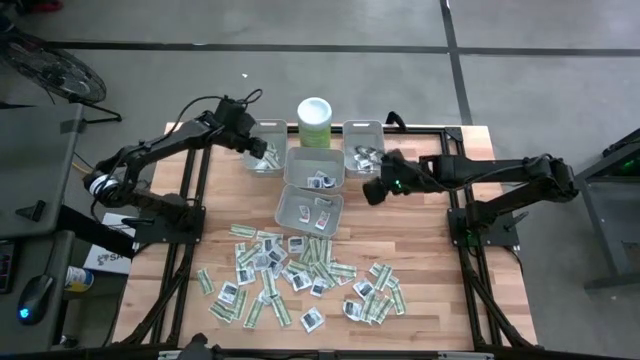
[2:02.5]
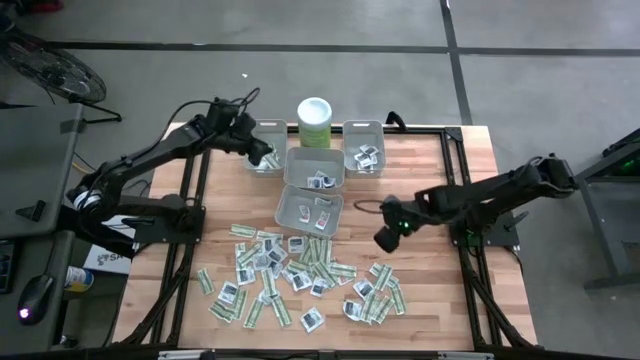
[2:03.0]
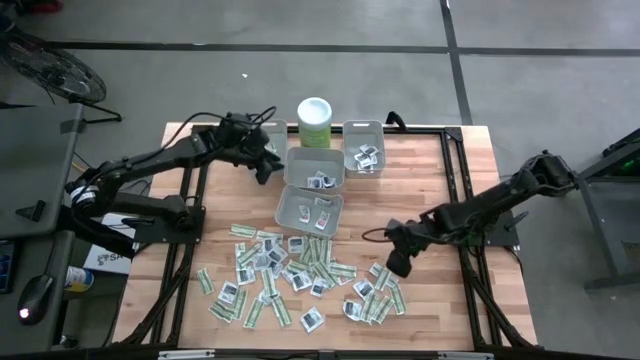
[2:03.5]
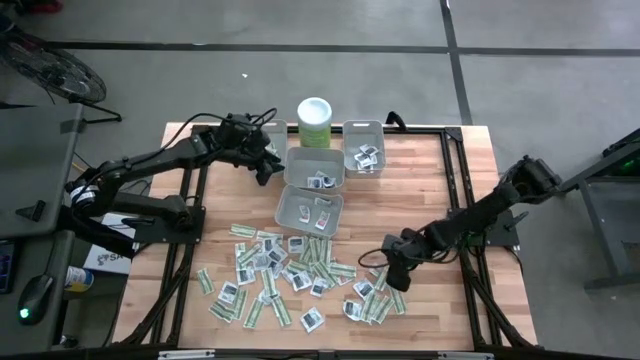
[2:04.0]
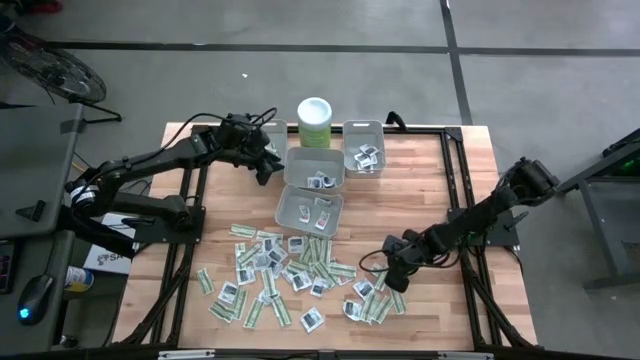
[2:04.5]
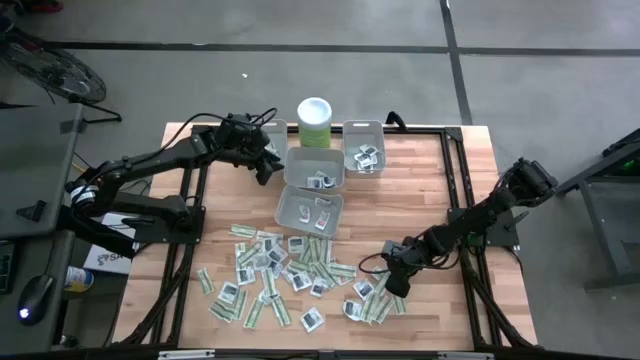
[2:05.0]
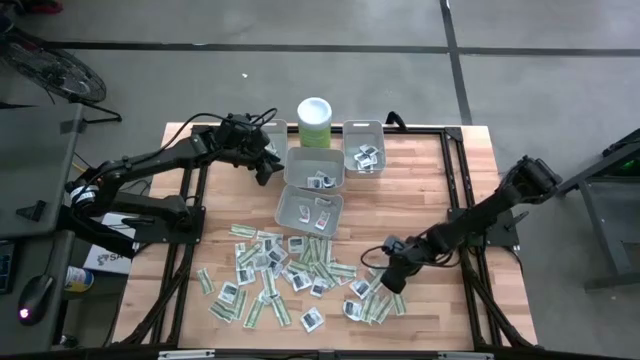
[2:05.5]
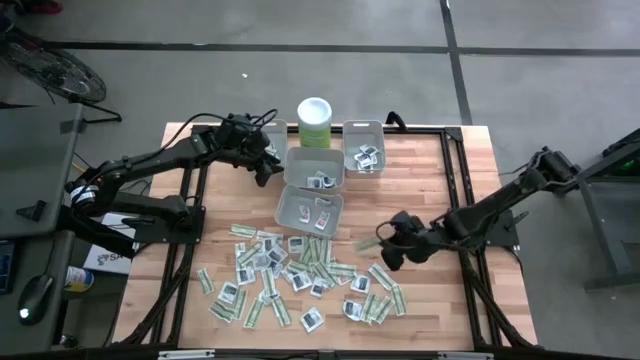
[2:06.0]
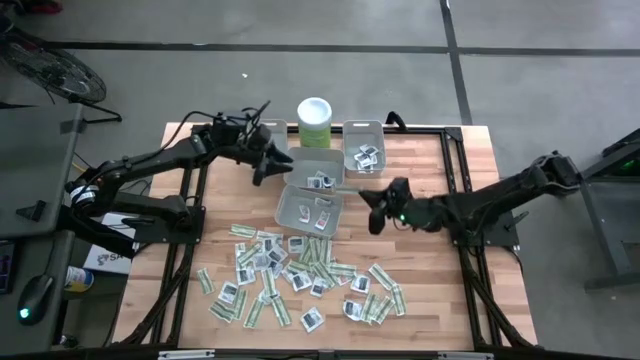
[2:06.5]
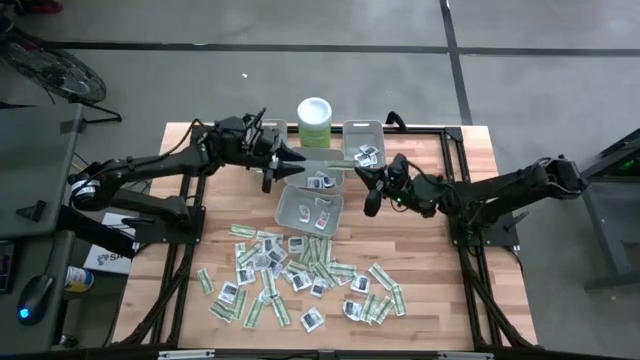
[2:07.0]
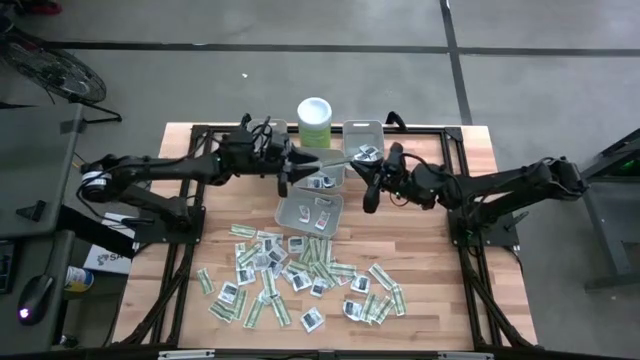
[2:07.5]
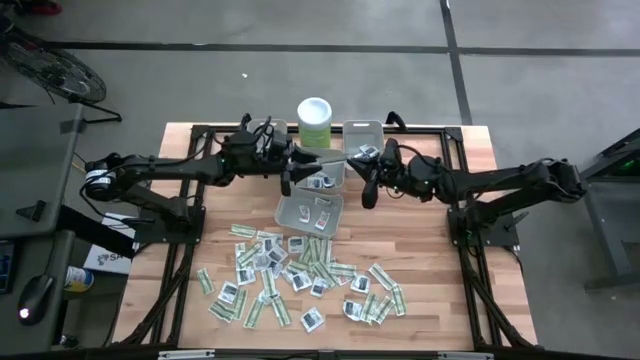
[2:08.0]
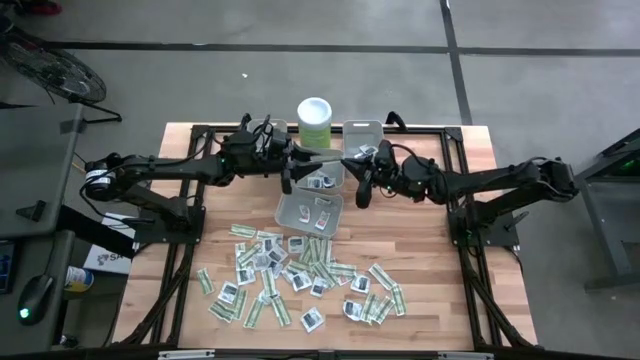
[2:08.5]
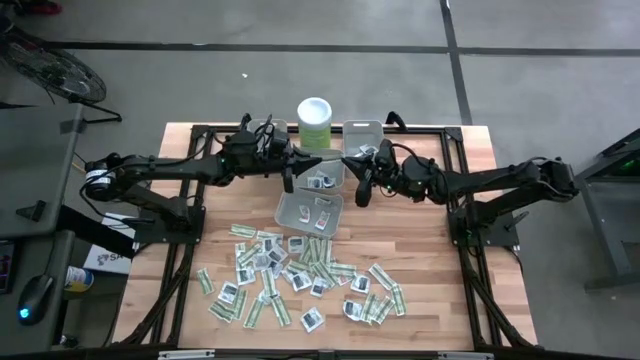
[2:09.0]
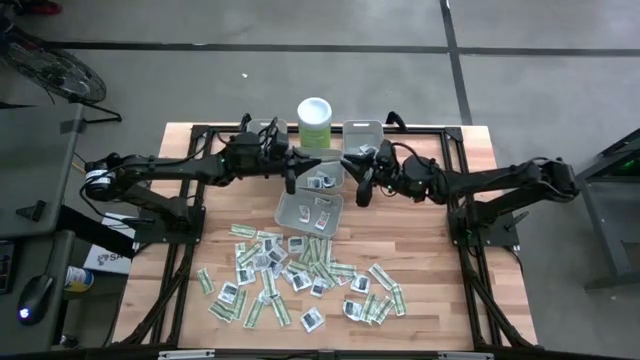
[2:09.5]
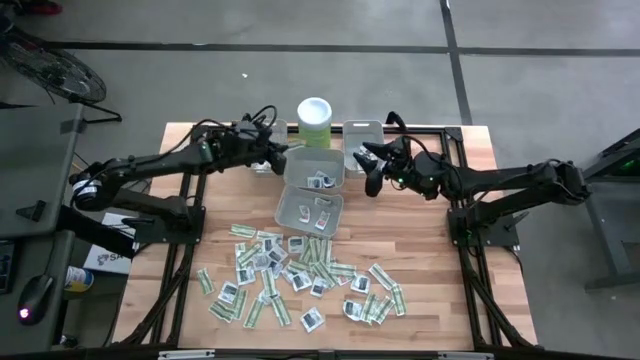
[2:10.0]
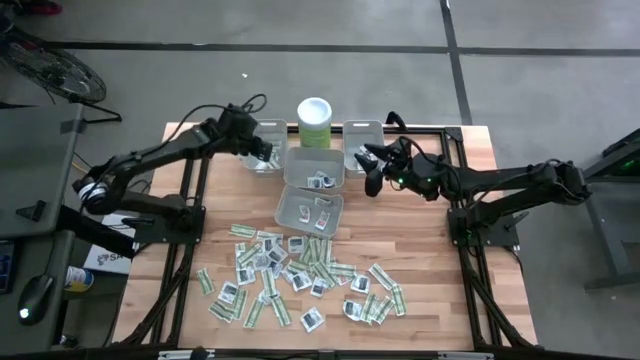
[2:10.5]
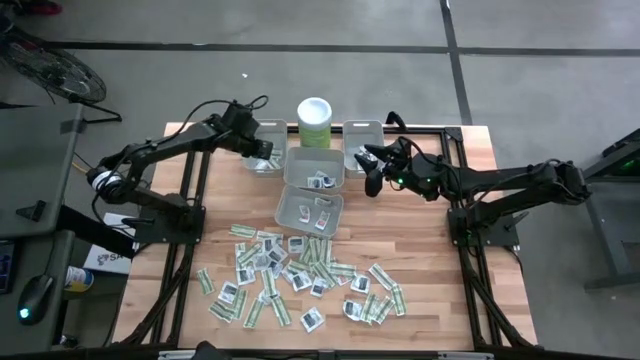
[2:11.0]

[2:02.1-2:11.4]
Task: Pick & Place First Aid Supplies
Put the bandage pack into the left bin

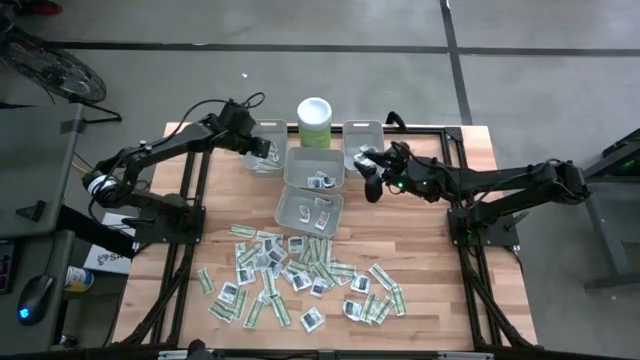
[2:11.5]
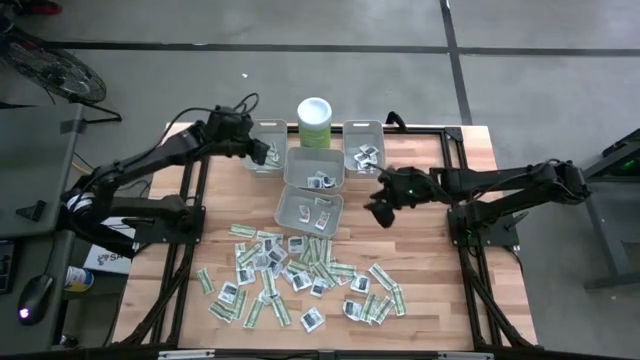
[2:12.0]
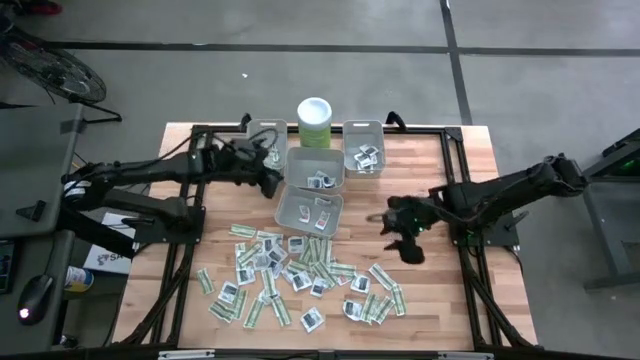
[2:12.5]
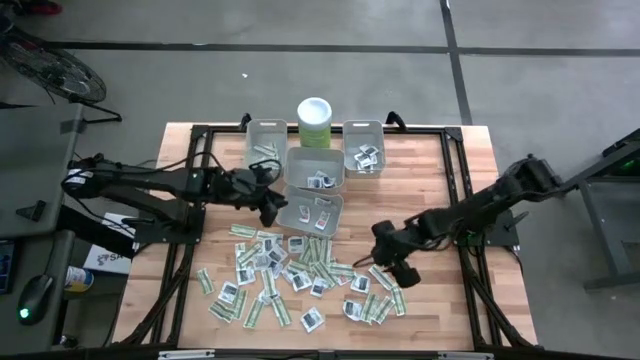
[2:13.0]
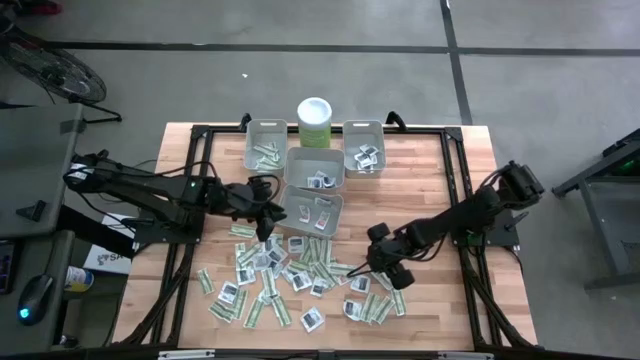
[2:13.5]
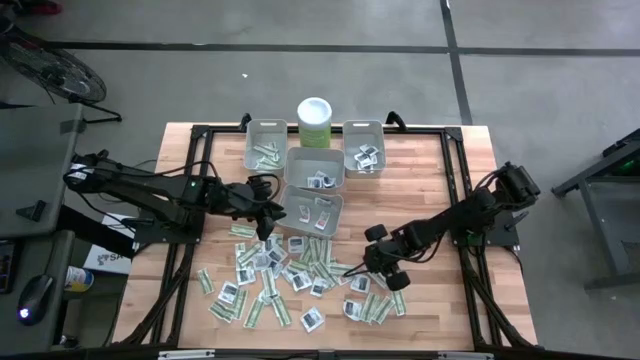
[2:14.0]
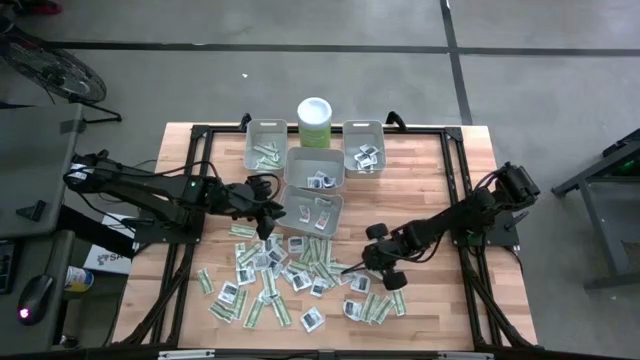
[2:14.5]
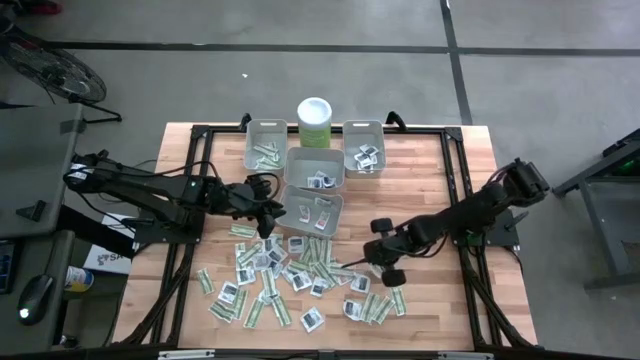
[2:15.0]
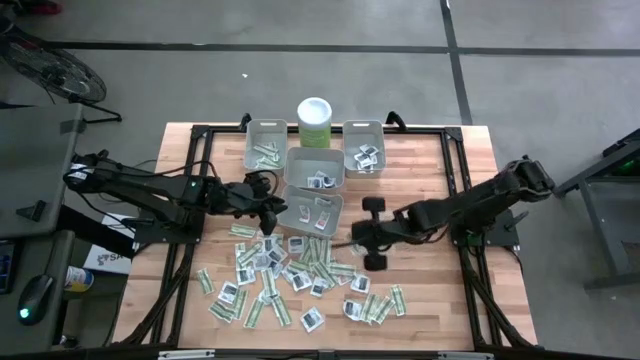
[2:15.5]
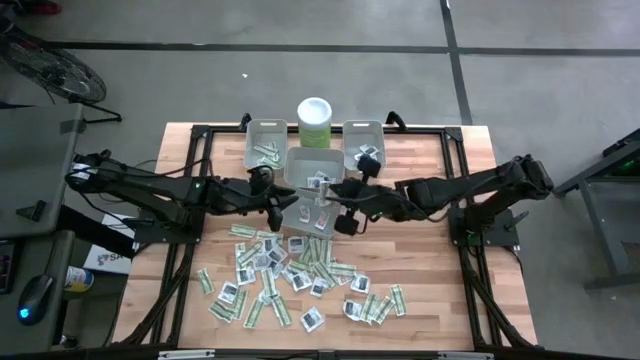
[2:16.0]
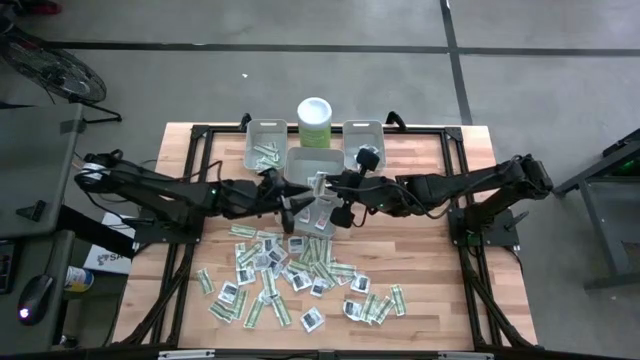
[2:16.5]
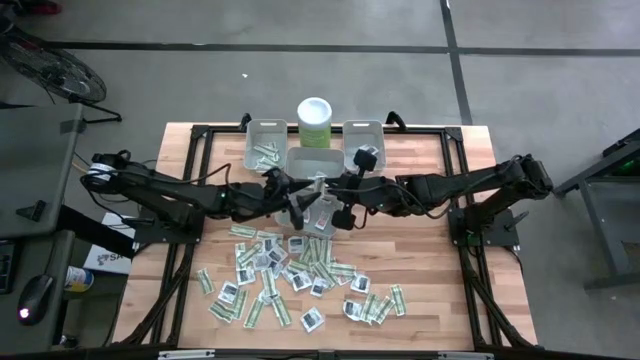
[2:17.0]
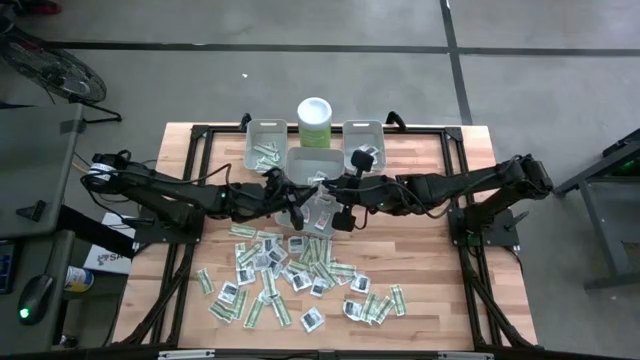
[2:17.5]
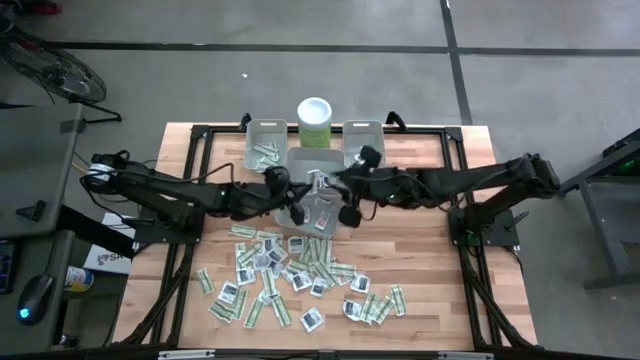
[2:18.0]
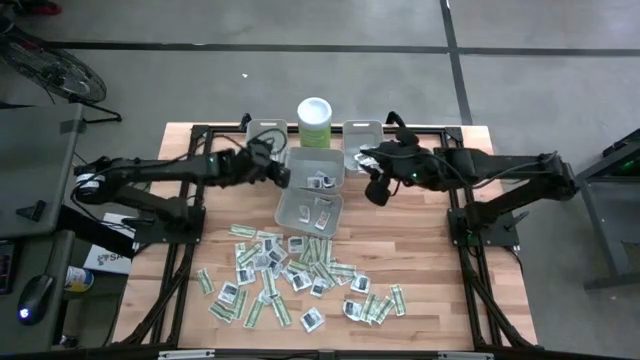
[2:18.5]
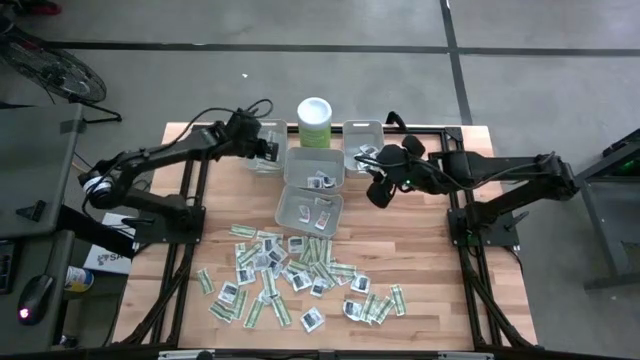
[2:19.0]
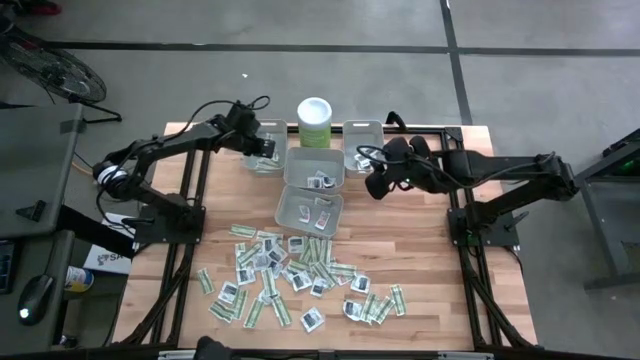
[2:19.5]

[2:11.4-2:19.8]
Put the bandage pack into the left bin

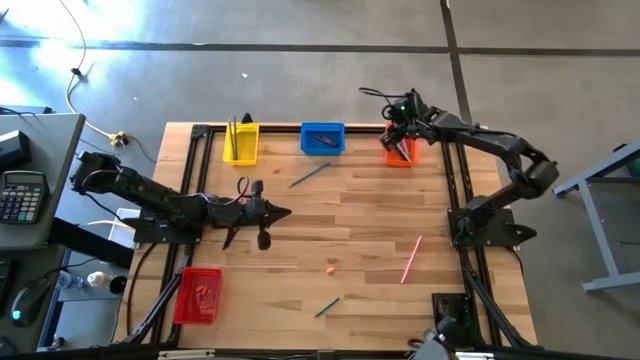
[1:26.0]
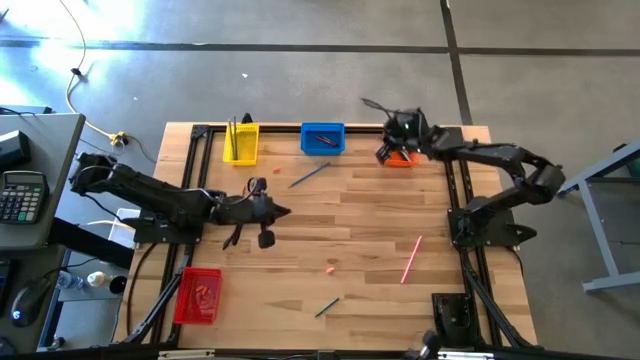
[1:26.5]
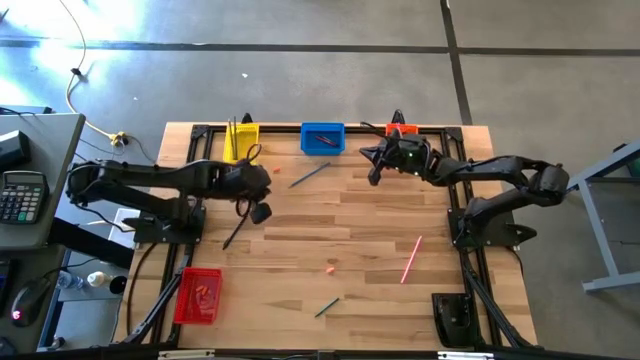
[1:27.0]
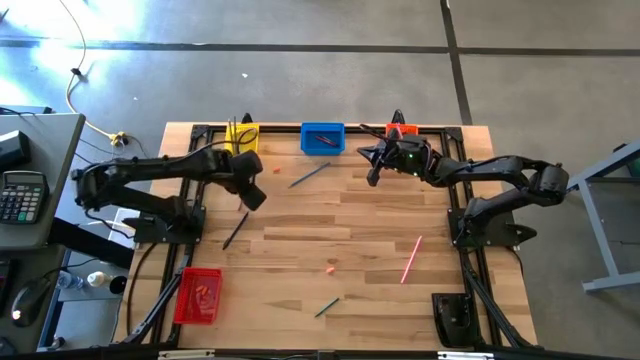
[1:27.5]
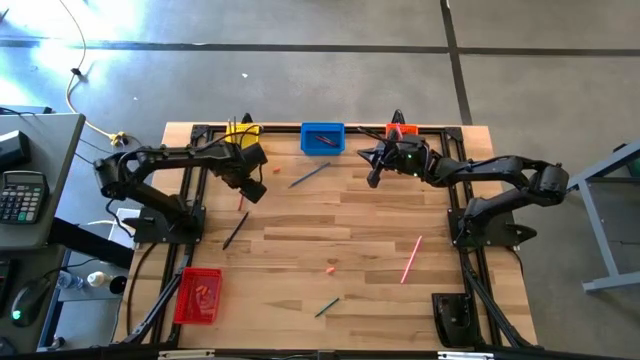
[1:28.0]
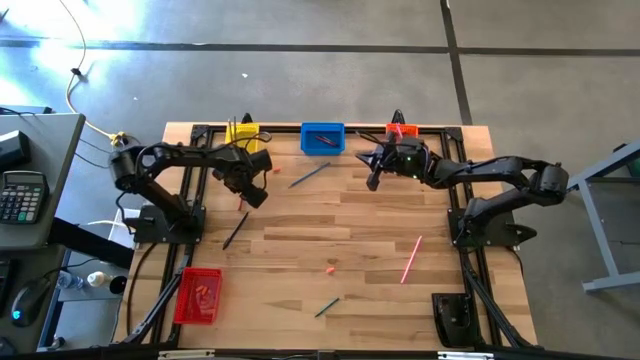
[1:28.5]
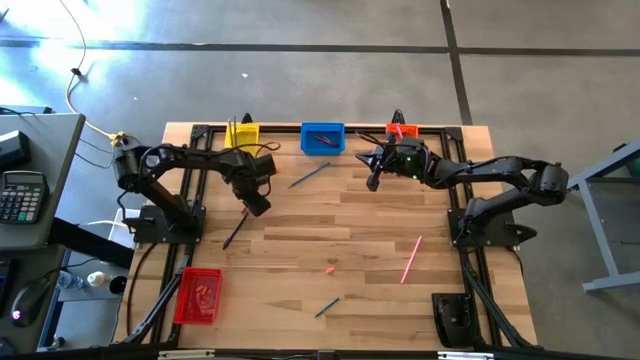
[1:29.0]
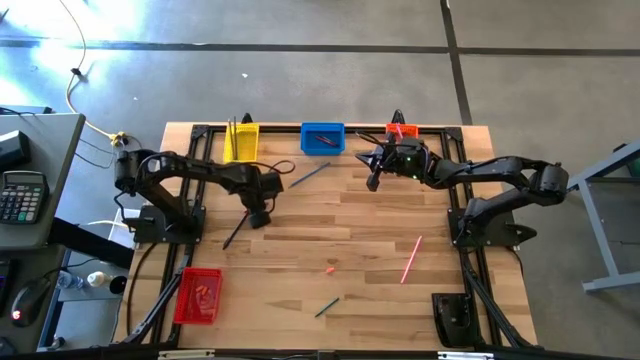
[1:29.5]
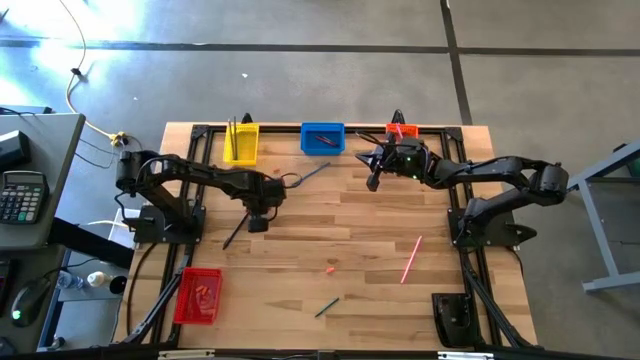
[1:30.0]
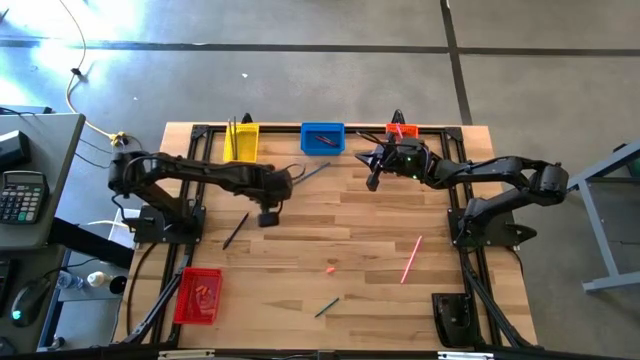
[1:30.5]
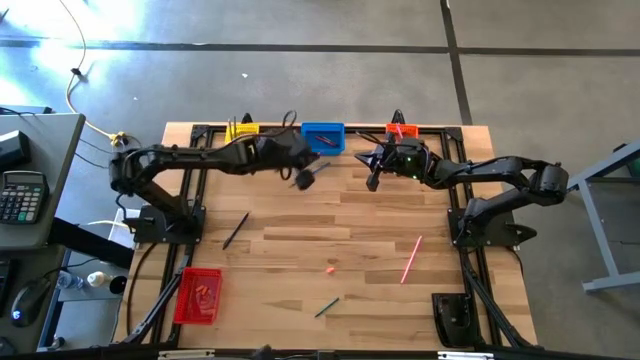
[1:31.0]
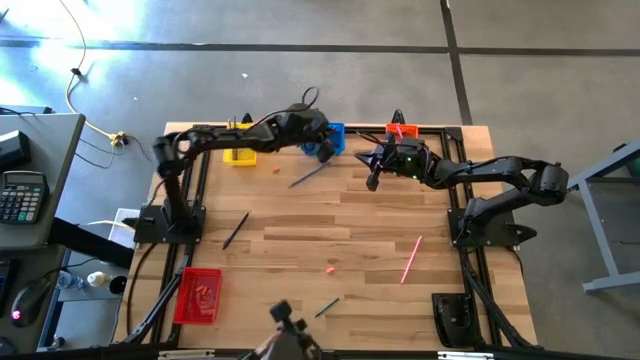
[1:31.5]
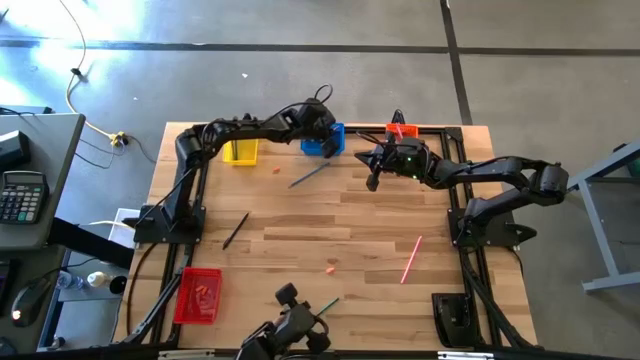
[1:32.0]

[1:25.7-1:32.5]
Task: Sort crayons/erasers/pens/pencils in bins
Put the red crayon into the blue bin
